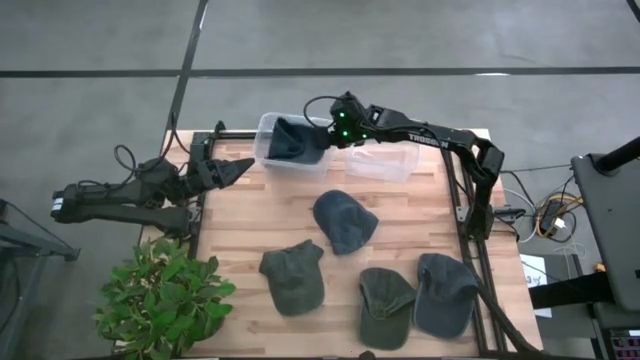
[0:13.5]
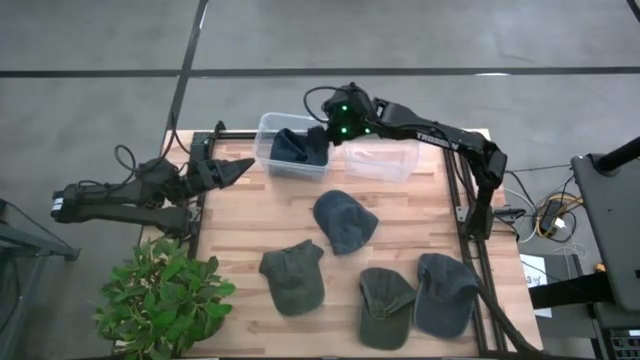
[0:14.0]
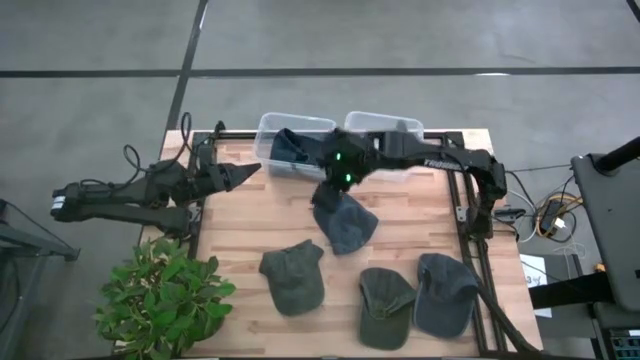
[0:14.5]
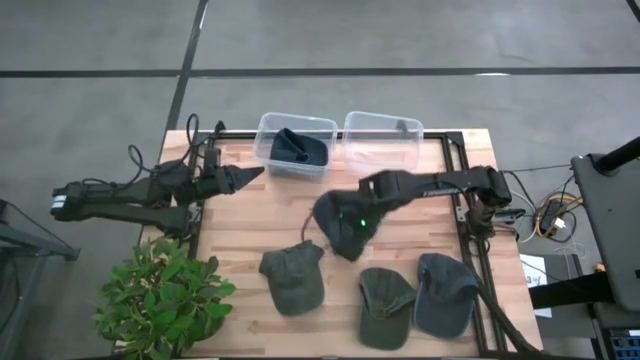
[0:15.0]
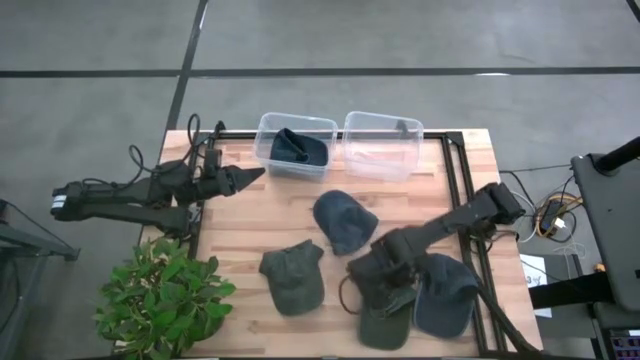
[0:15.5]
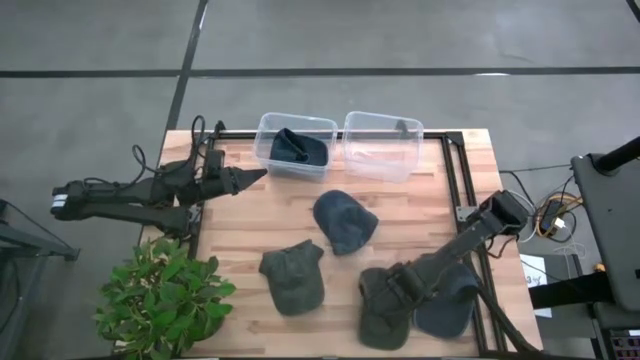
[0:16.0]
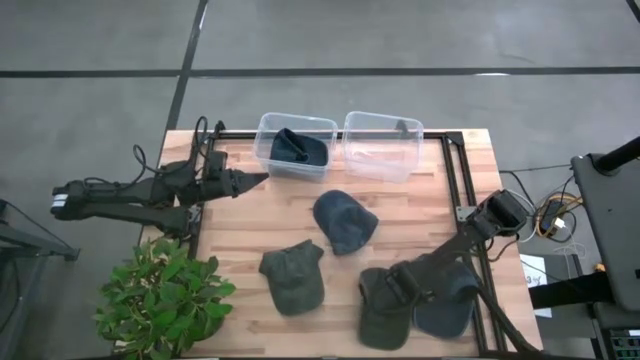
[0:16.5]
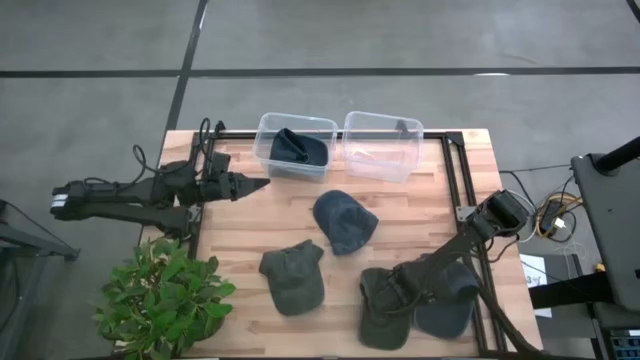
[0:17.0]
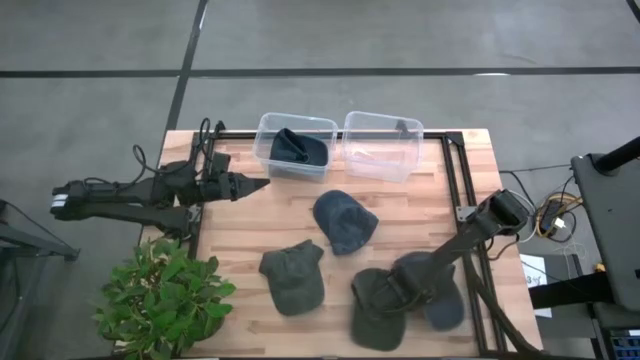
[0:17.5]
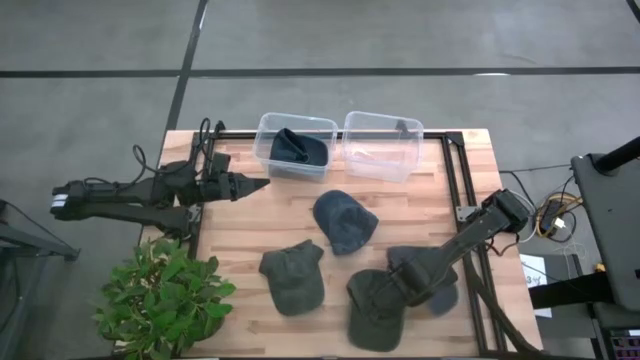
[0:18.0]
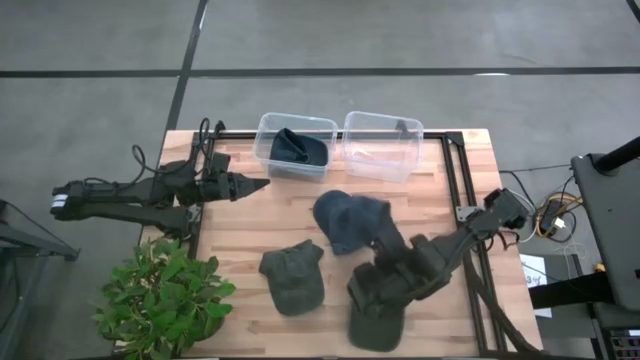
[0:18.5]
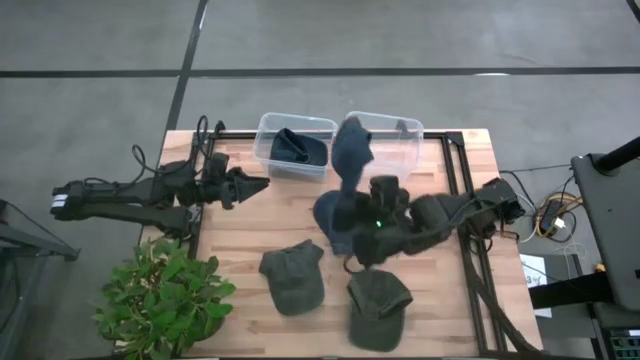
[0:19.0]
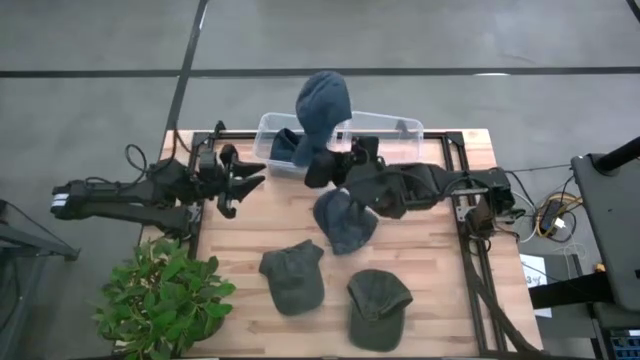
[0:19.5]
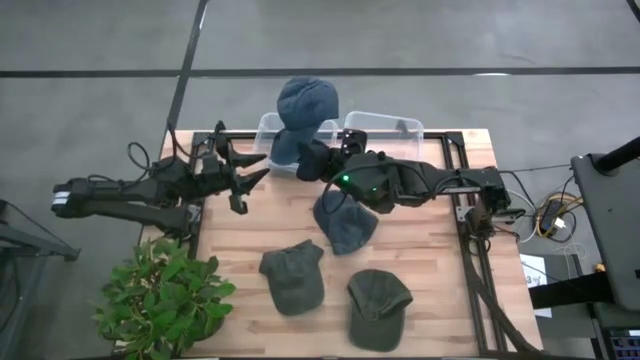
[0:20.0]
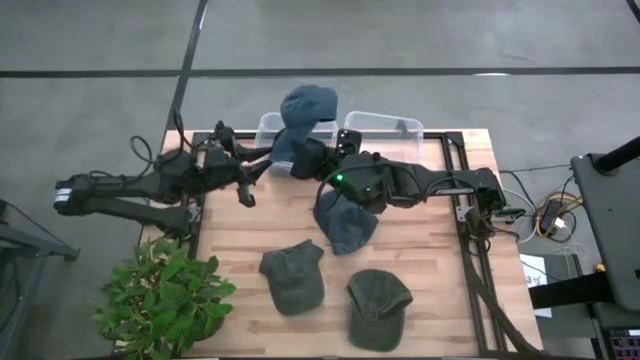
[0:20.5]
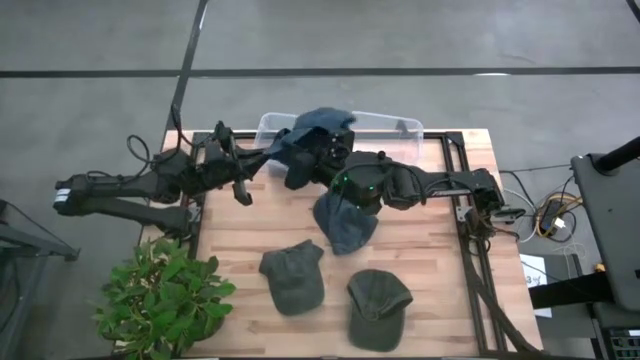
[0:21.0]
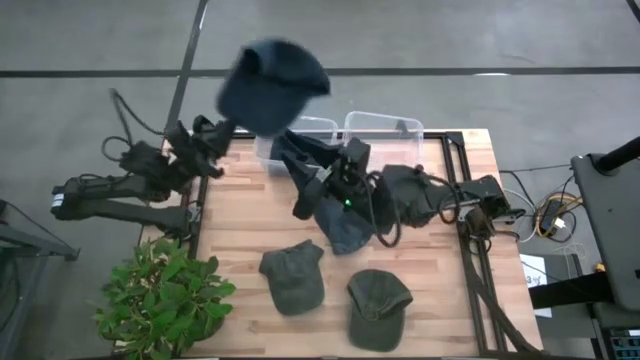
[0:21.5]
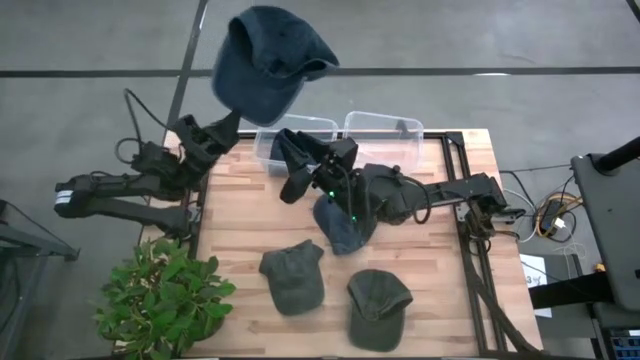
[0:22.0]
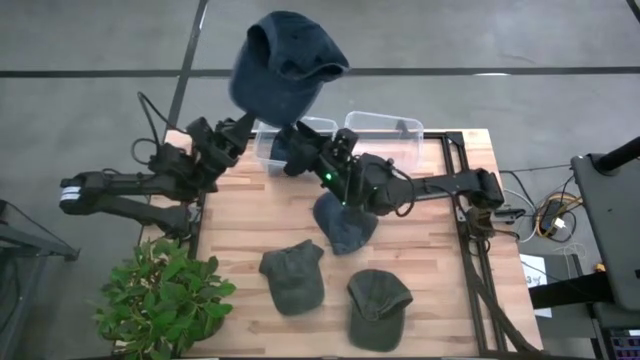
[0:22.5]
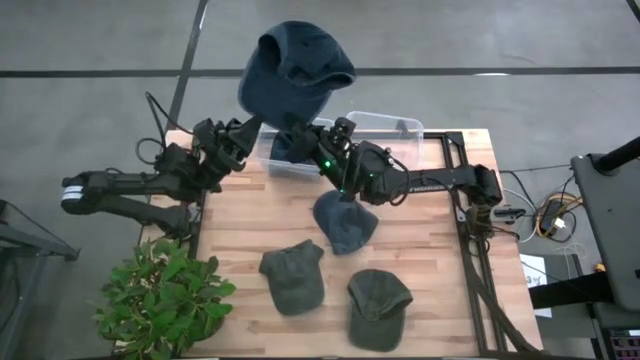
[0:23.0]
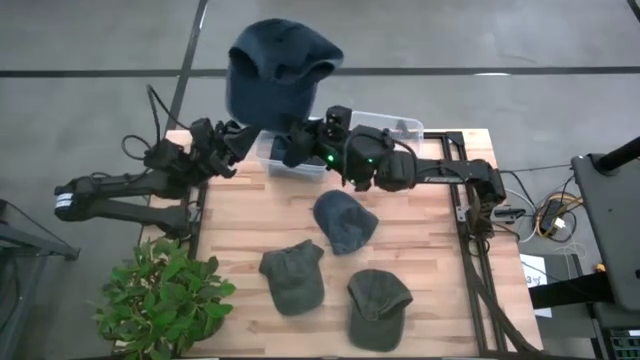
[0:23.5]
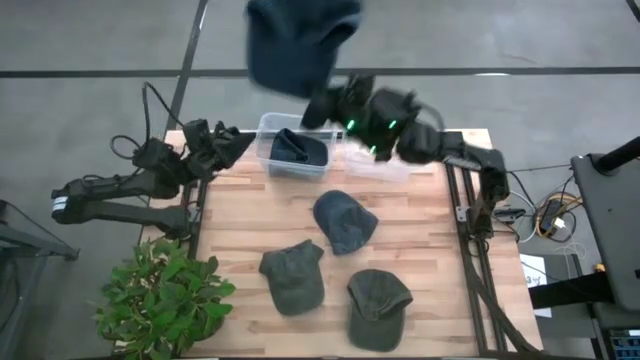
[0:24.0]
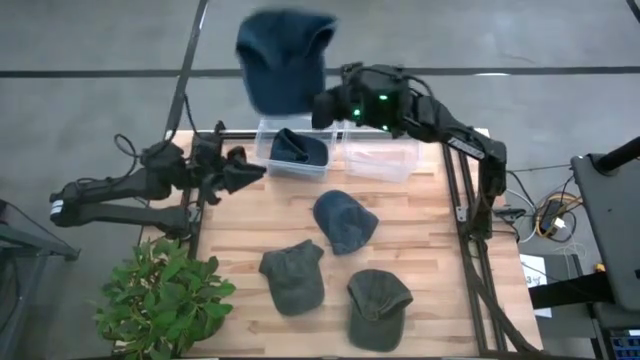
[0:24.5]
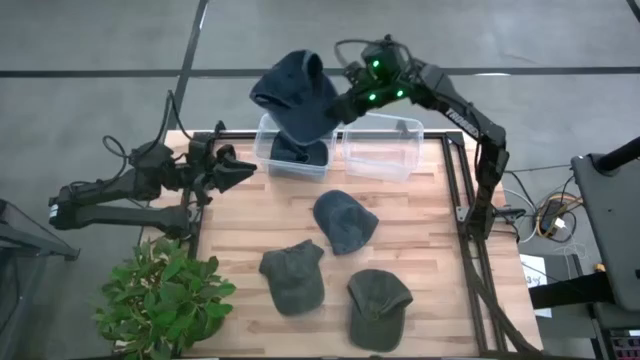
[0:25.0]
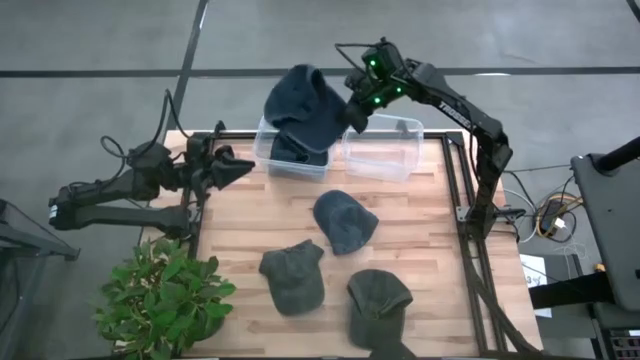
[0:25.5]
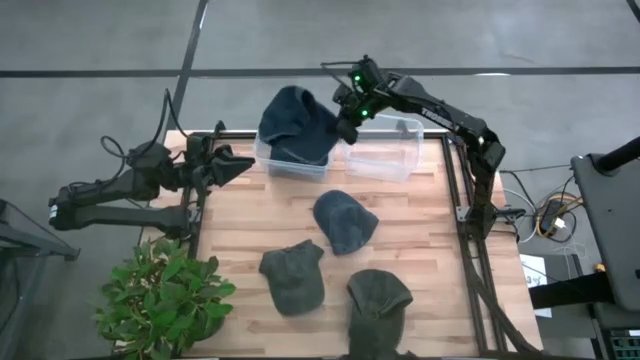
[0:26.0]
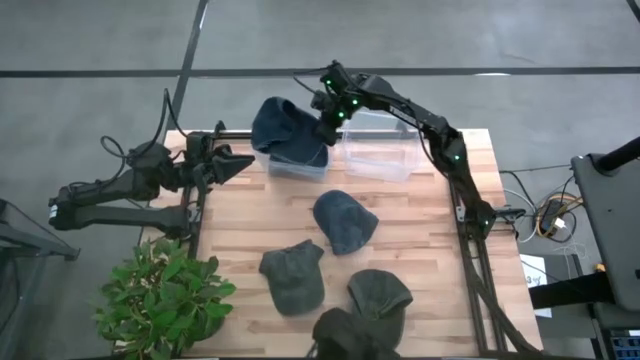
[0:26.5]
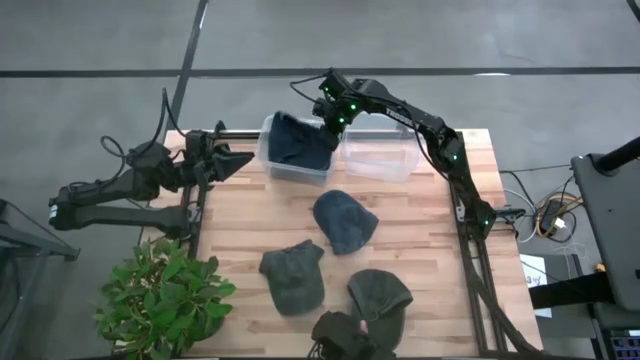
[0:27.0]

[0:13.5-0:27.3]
Task: Pick & Place hat
Put the bottom blue cap into the left transparent bin

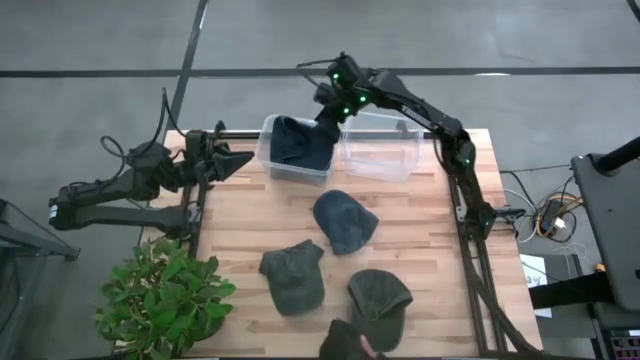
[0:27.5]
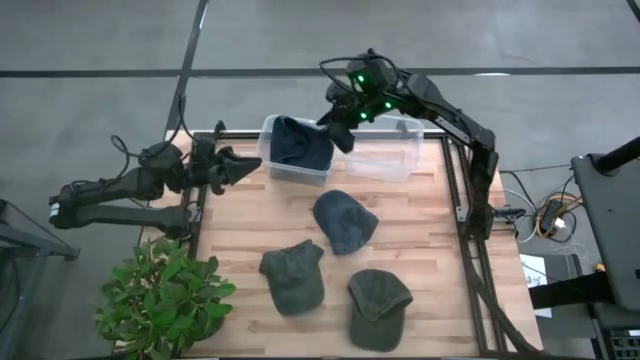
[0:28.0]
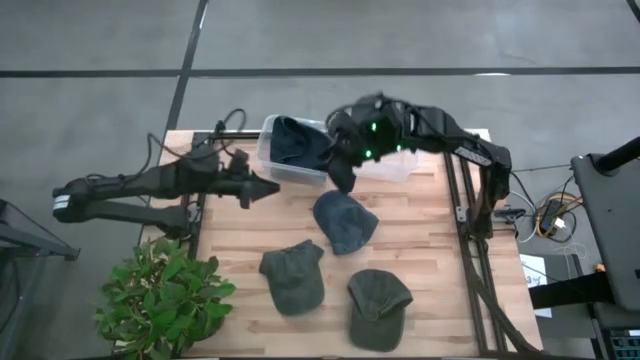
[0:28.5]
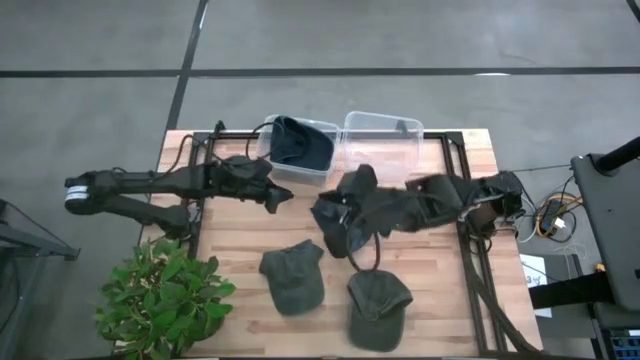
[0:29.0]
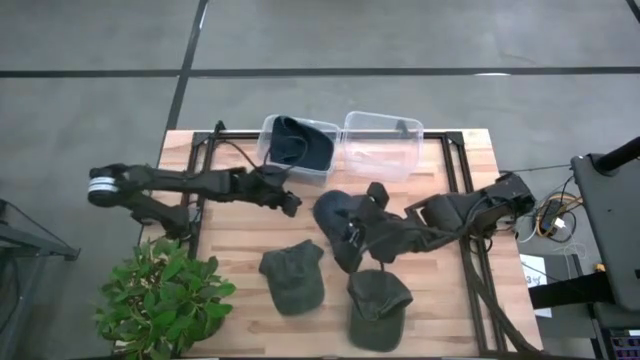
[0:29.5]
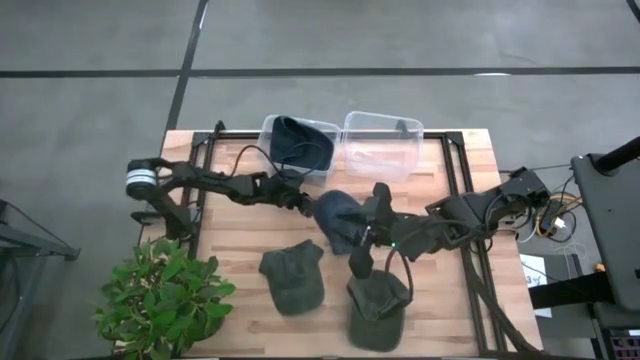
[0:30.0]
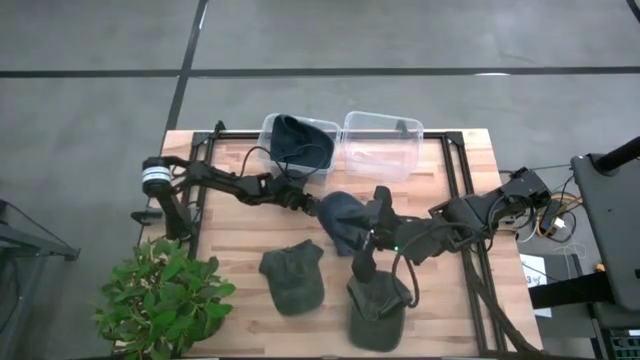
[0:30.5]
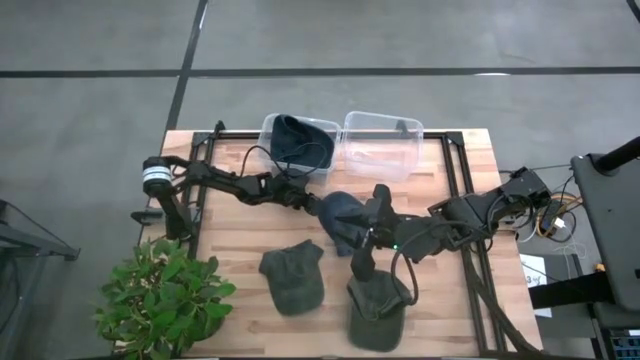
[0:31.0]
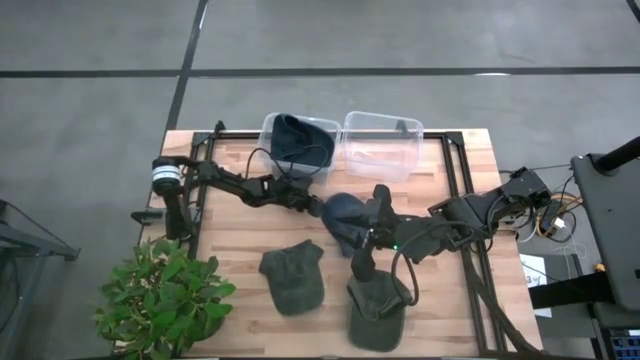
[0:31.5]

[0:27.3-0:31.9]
Put the blue cap into the left transparent bin
